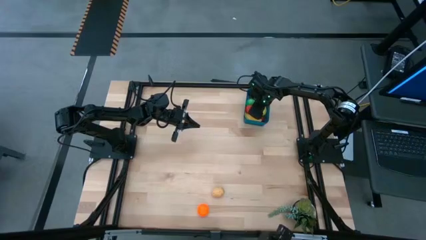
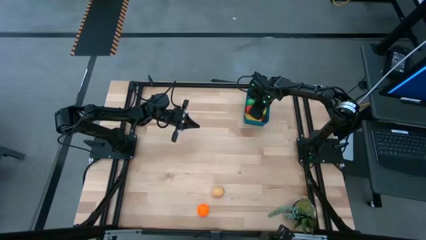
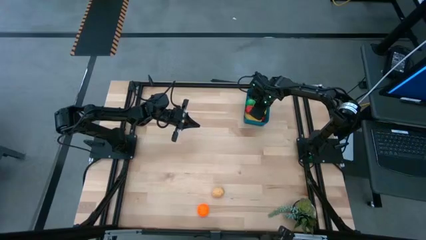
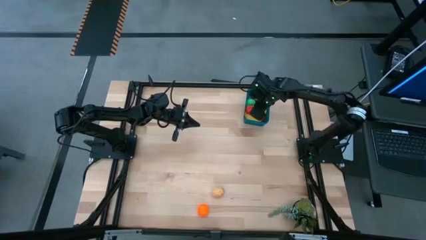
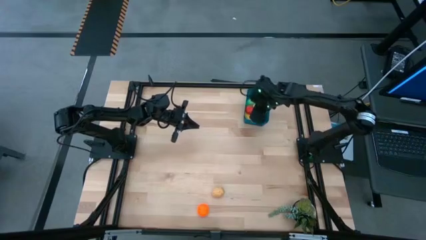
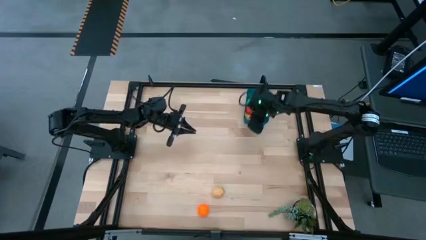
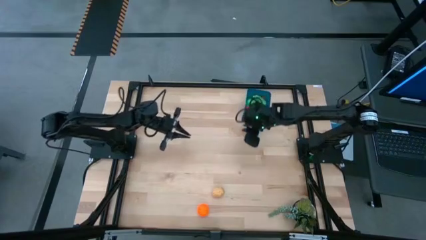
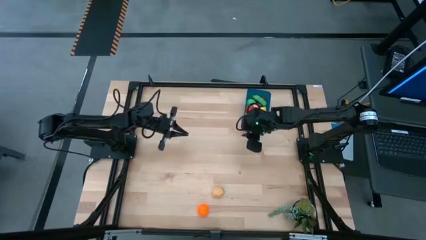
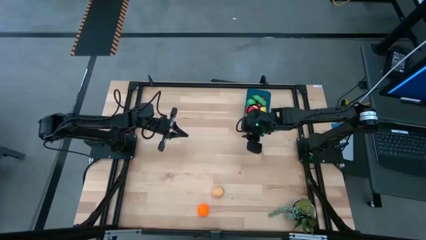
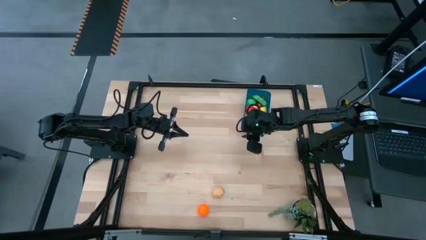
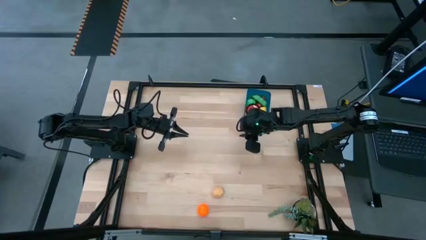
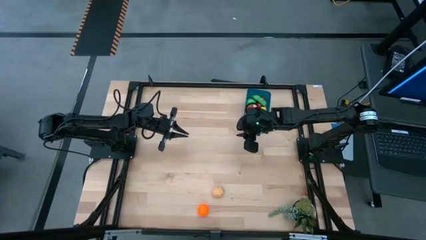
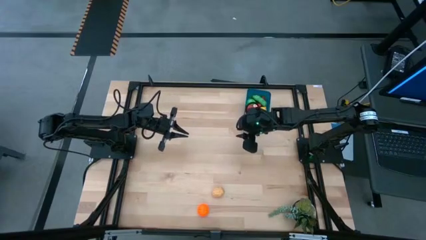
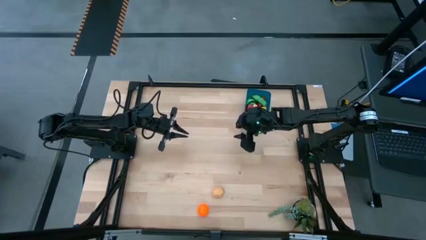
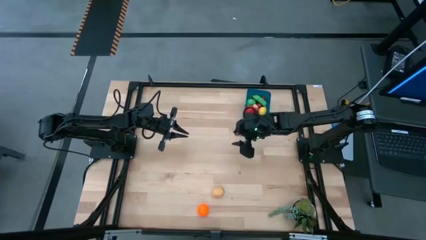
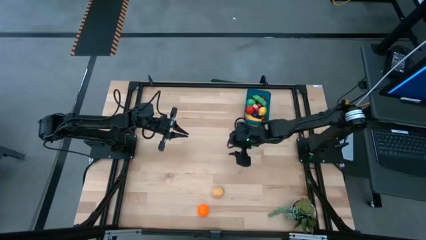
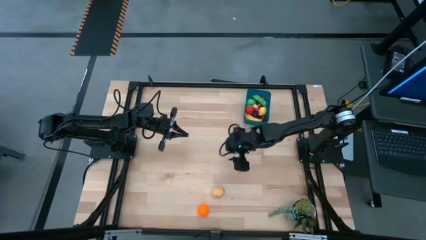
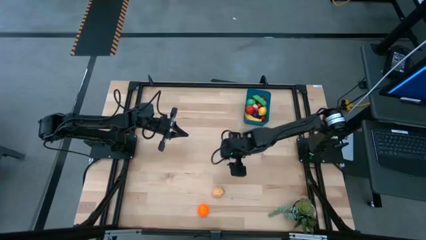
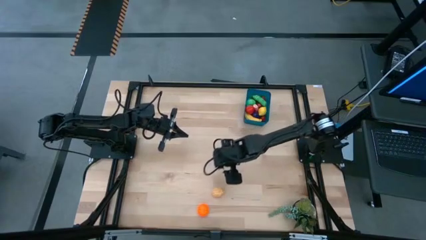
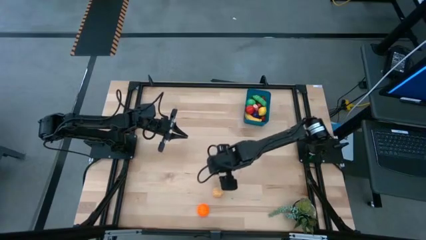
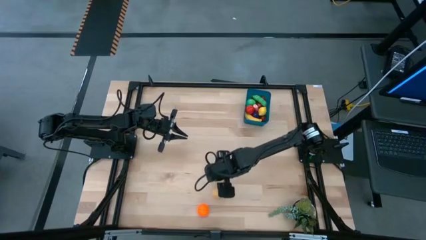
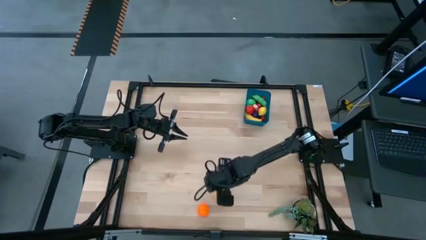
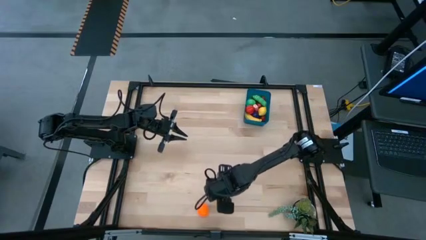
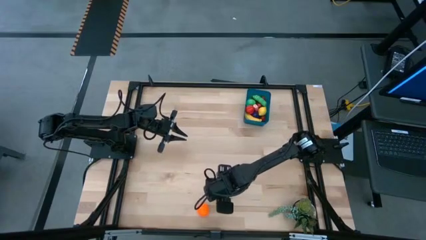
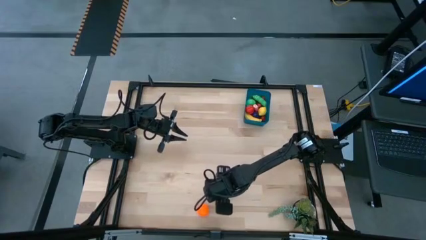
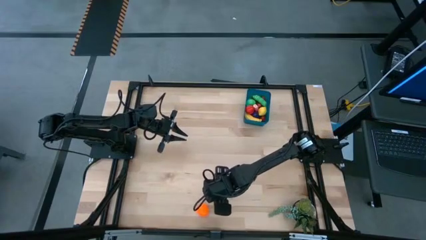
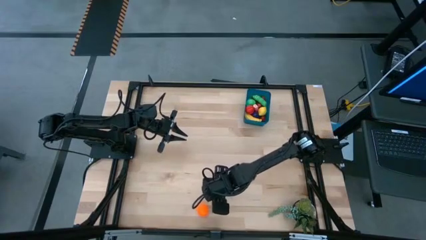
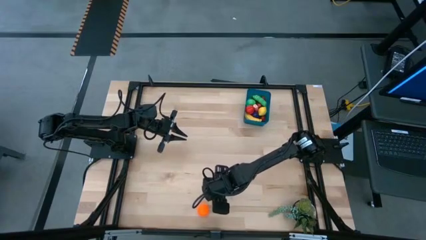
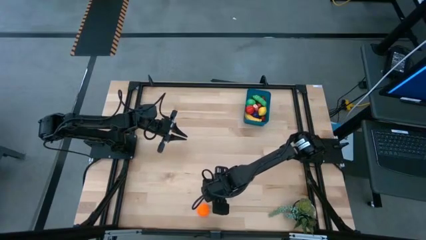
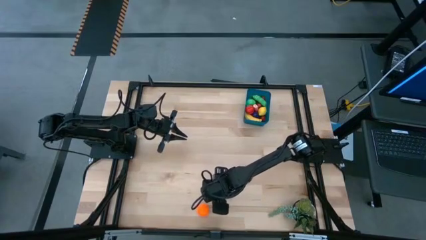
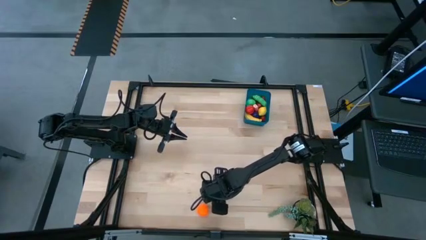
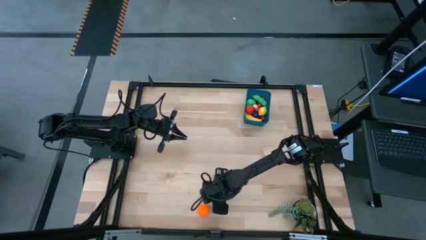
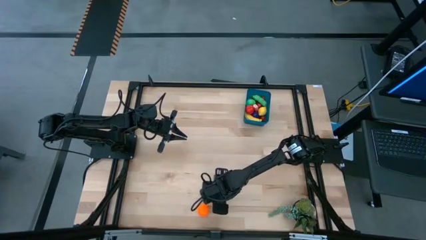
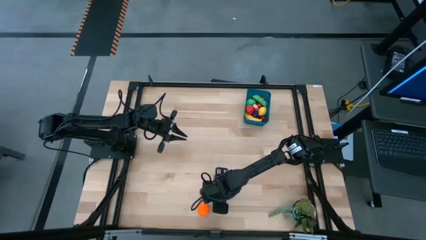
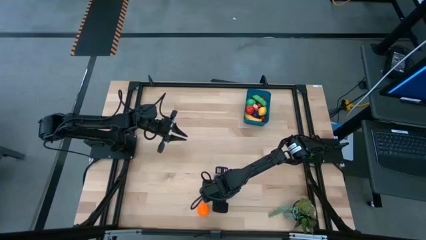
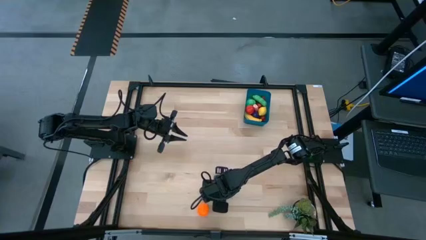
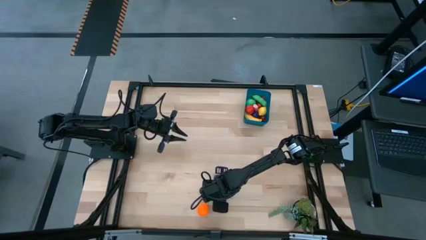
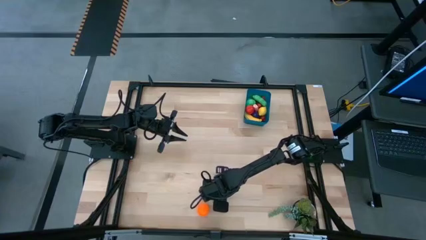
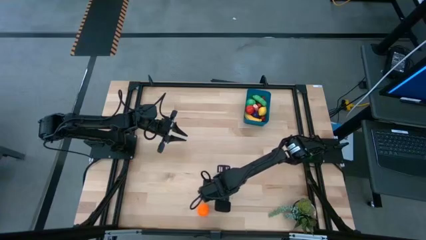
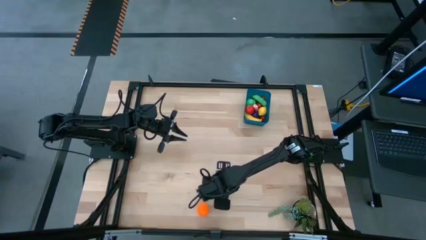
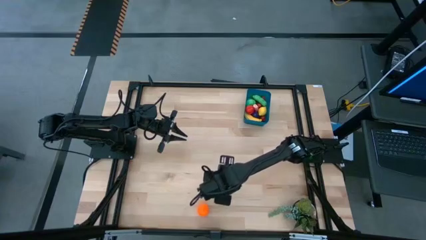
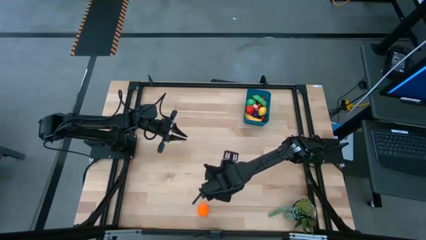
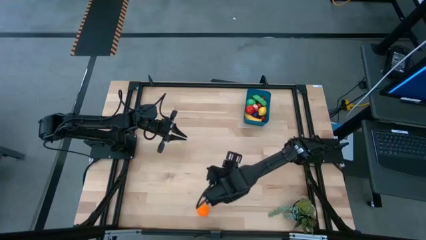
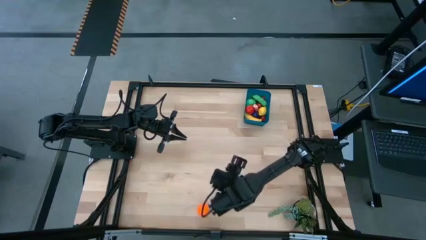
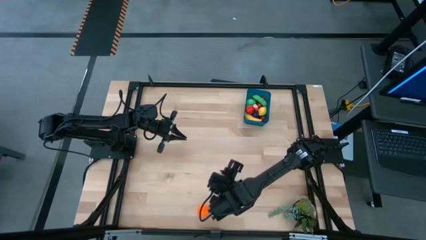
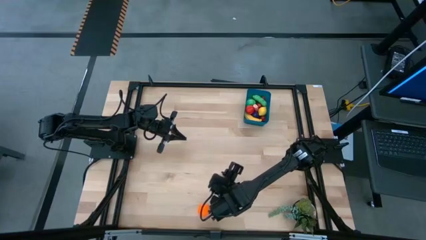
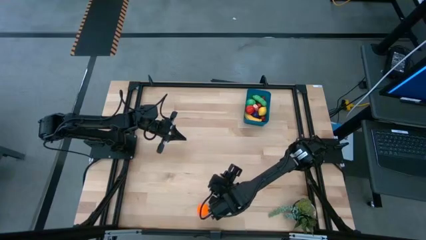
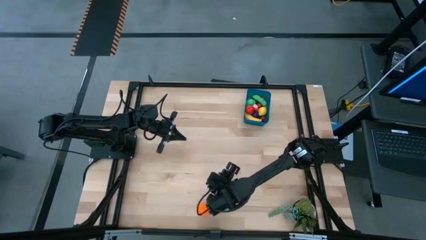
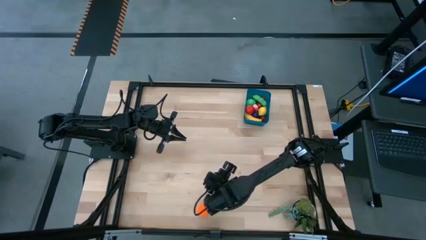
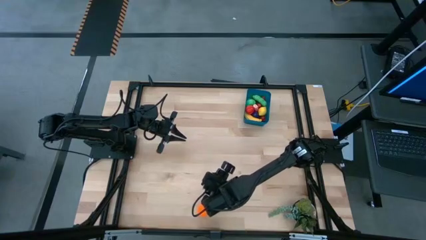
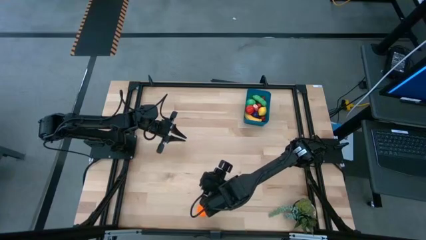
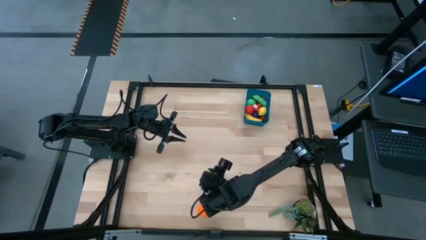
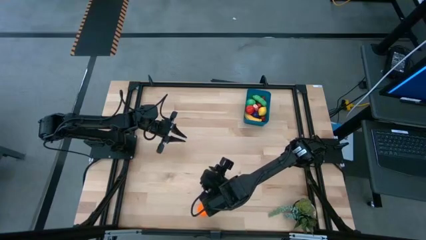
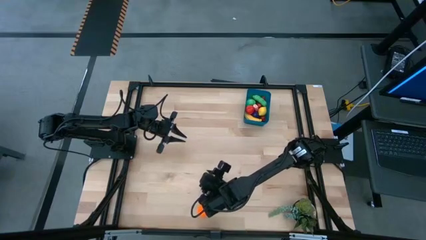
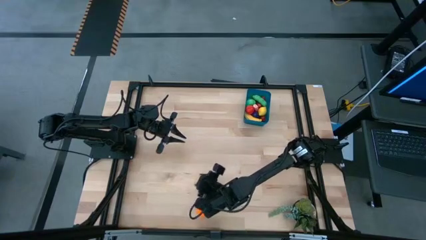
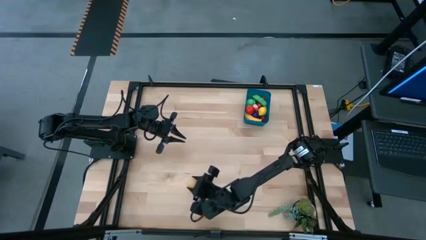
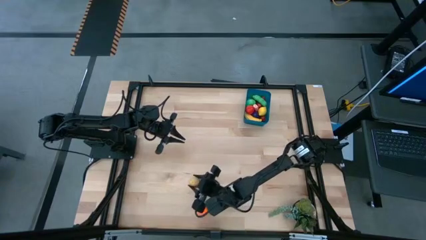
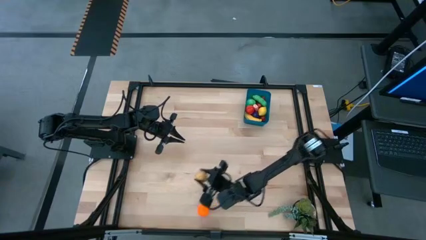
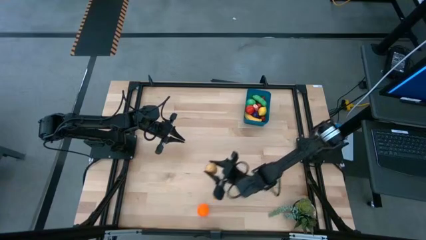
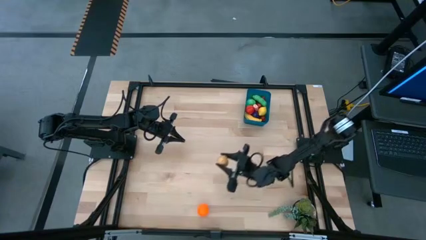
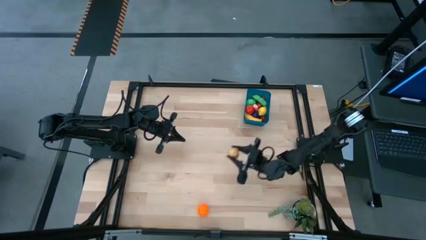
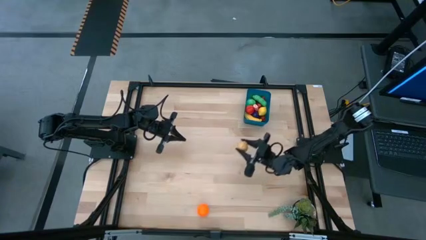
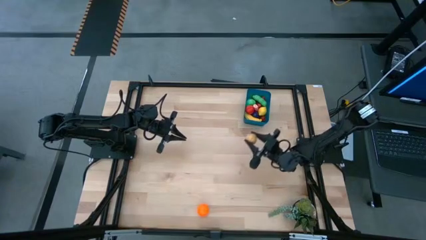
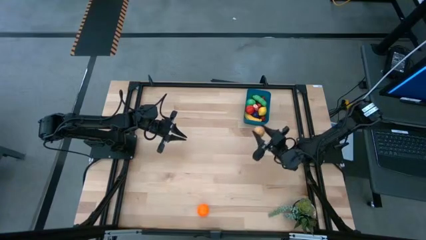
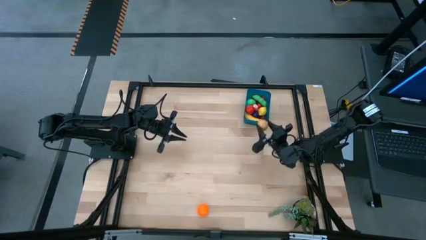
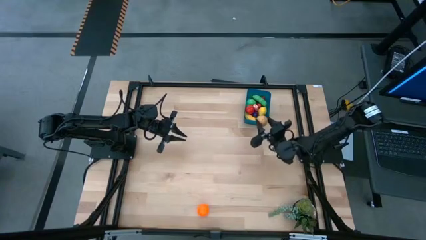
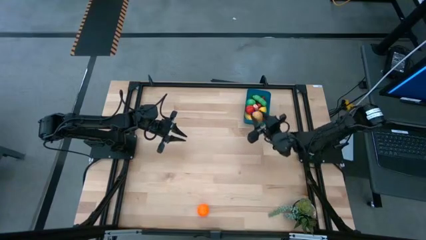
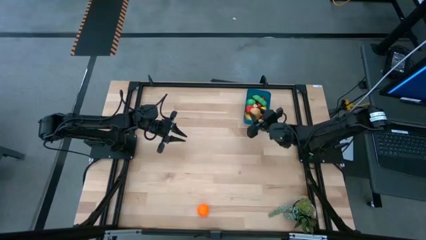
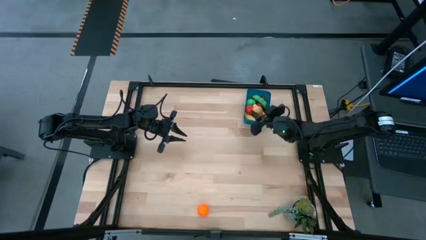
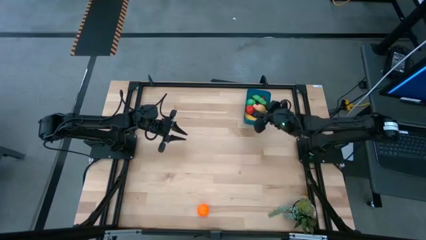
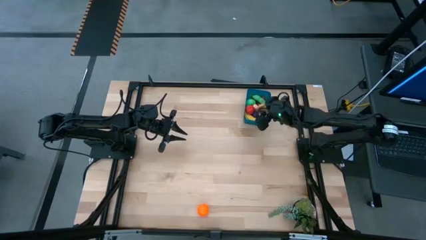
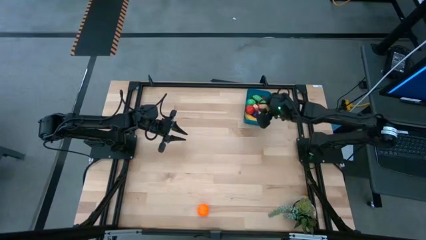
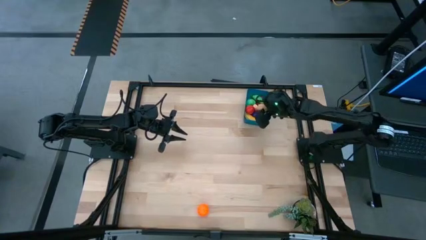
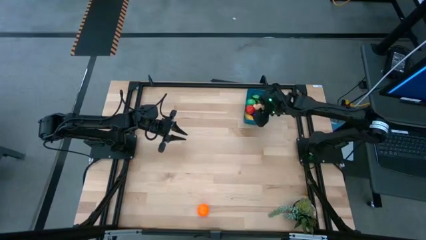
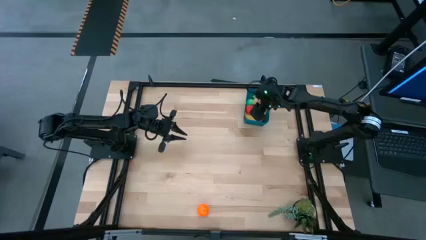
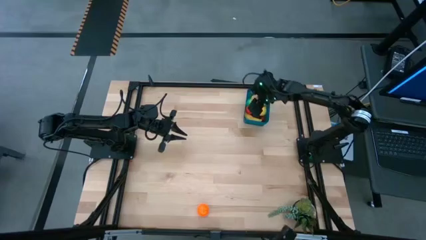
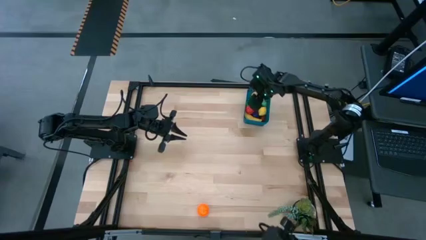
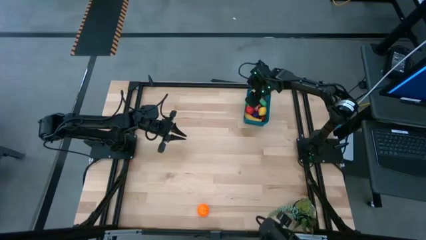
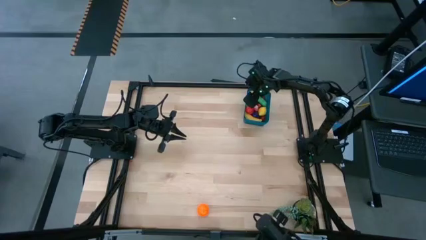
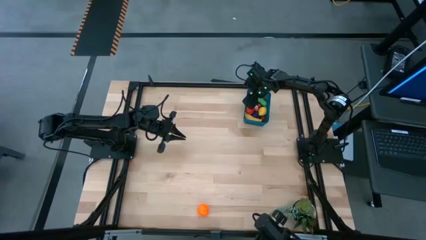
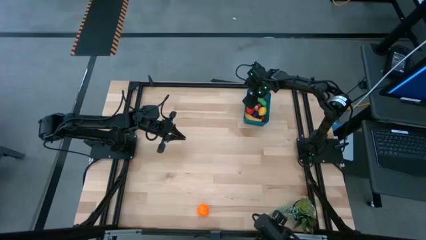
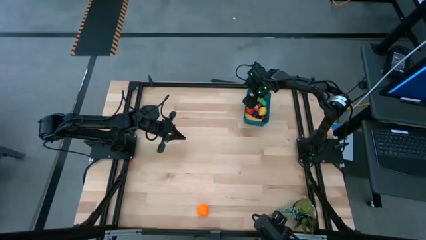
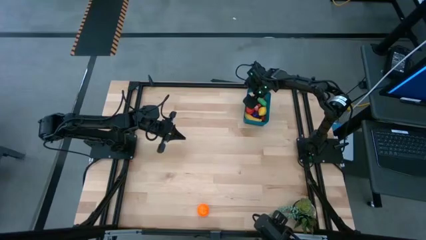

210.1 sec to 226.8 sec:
Task: Pick and placing Produce into tupperware
Put the brown potato into the blue bin
